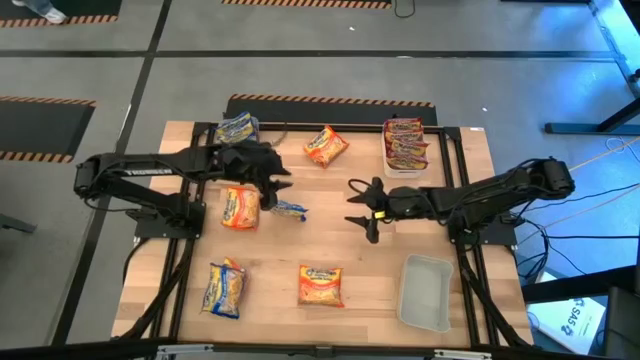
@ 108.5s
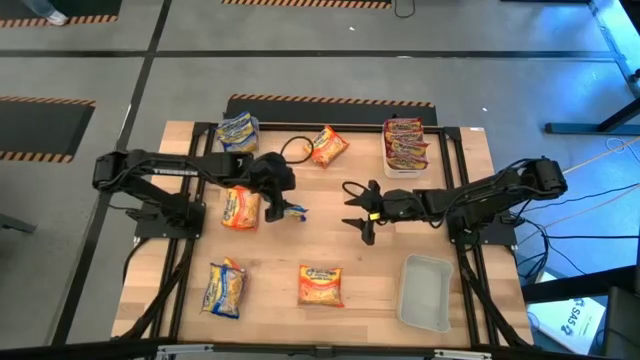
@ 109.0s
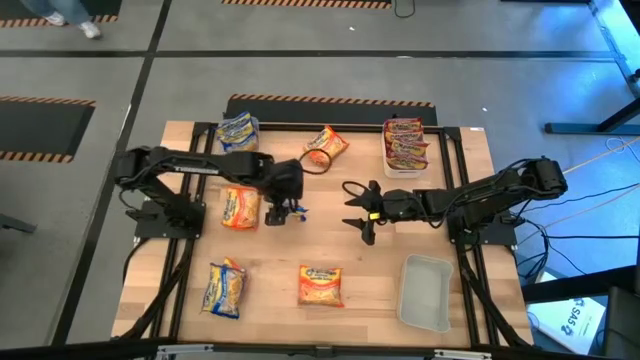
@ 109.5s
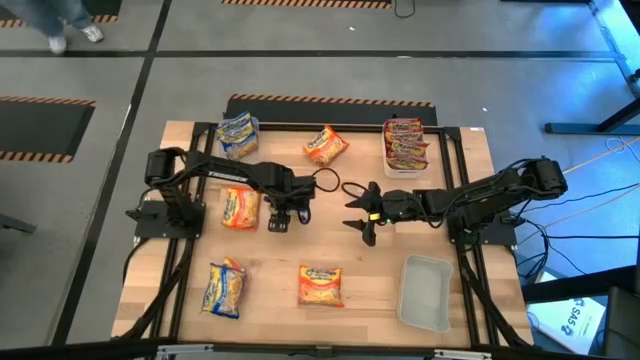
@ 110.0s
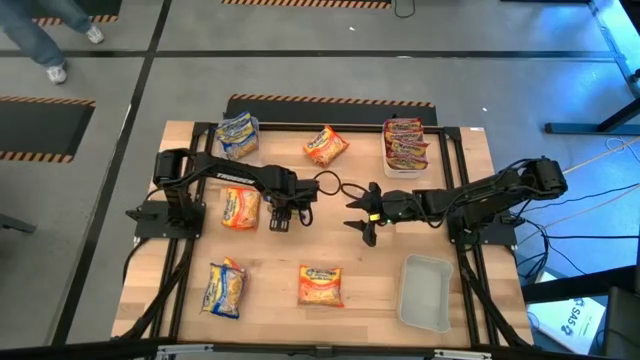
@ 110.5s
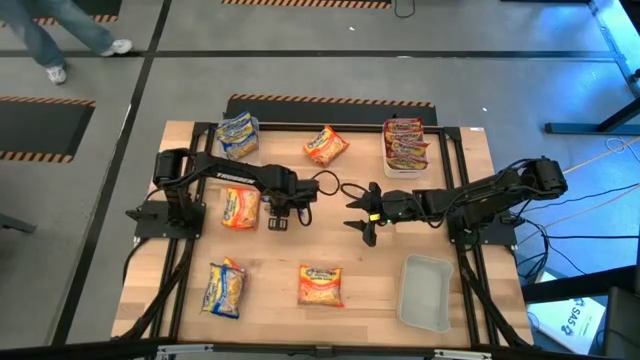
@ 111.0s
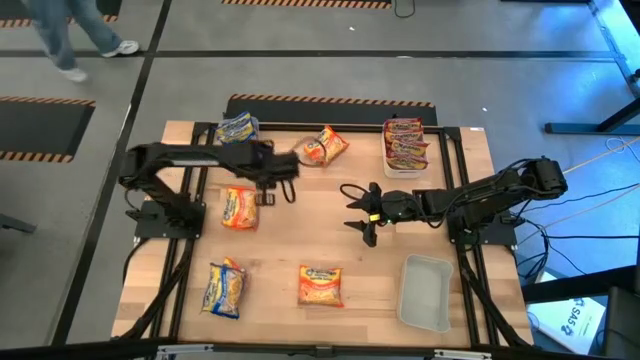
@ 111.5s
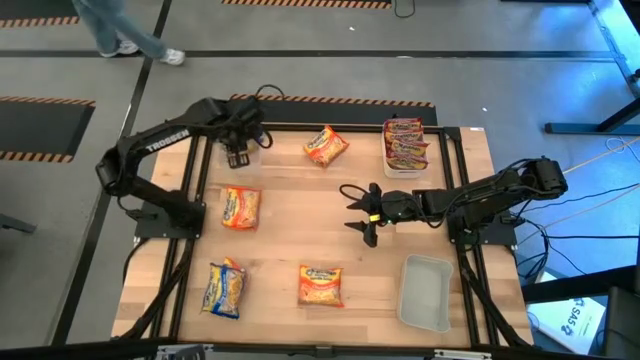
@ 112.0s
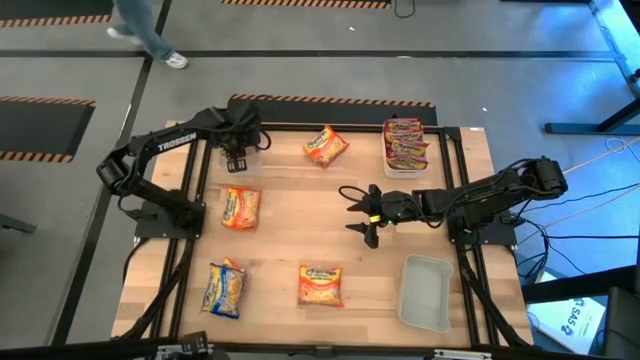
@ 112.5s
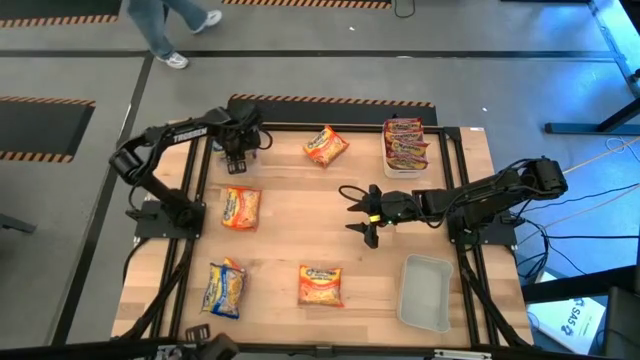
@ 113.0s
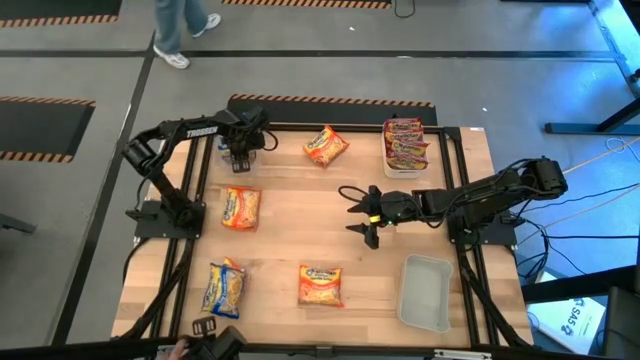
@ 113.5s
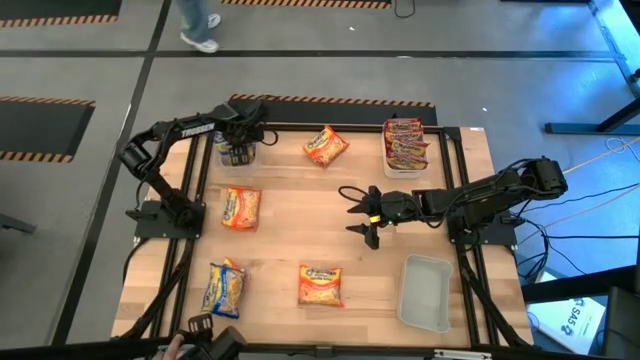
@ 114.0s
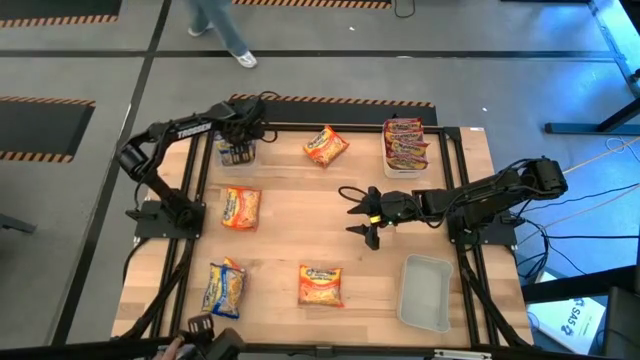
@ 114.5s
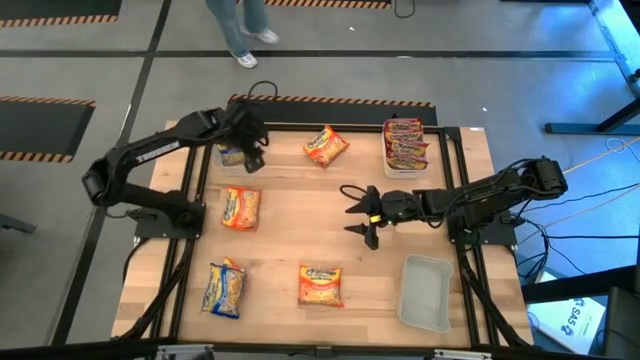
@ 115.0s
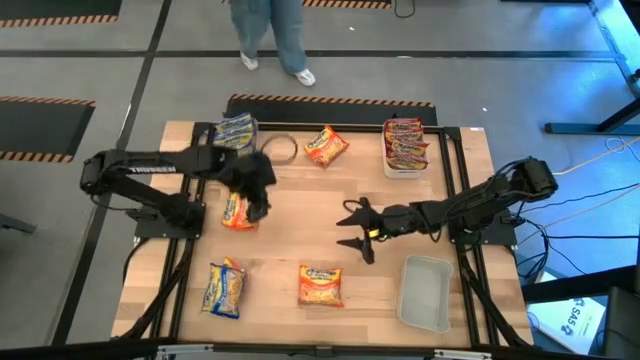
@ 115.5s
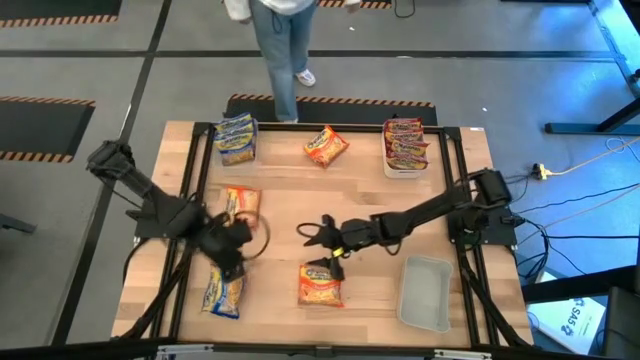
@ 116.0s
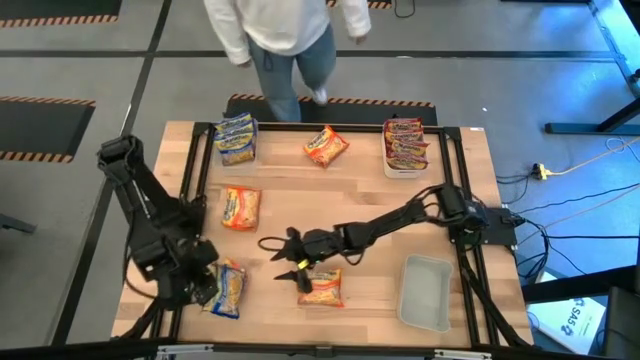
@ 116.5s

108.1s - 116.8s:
Task: Sort Maruchan noodles
Put the top blue noodle pack into the transparent bin

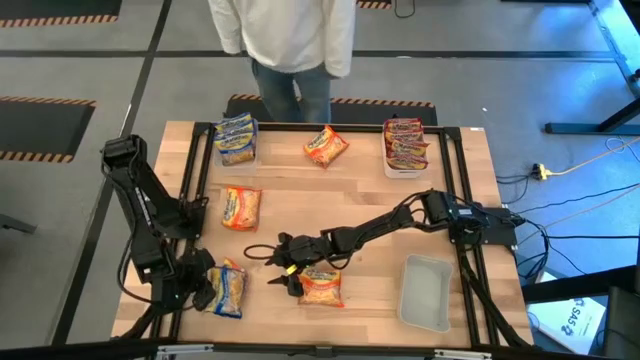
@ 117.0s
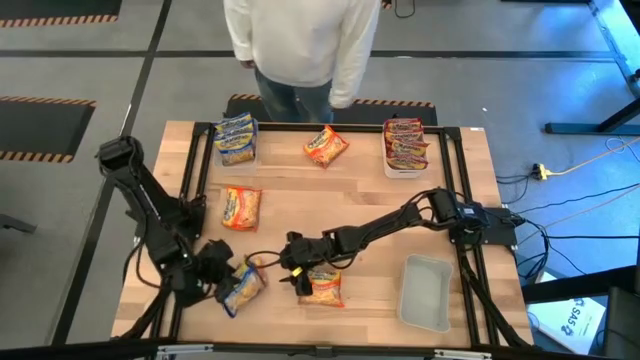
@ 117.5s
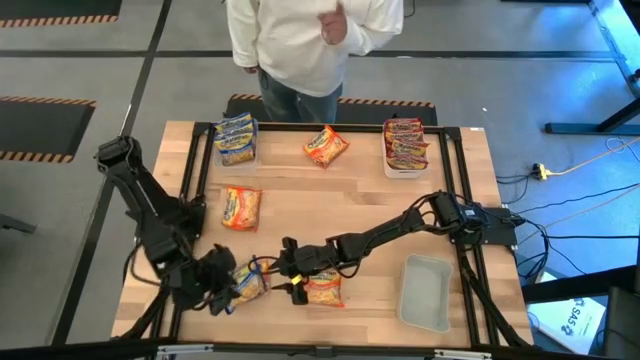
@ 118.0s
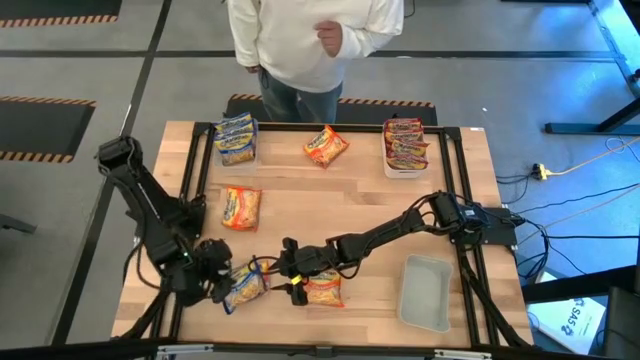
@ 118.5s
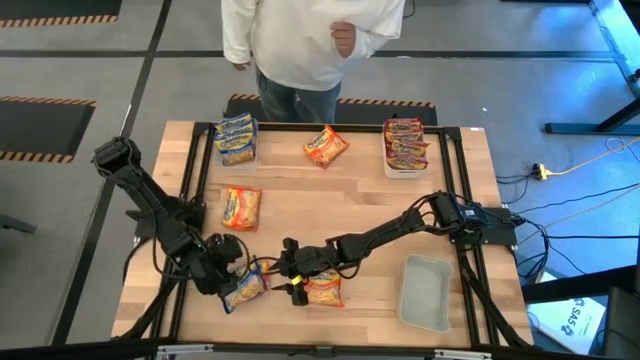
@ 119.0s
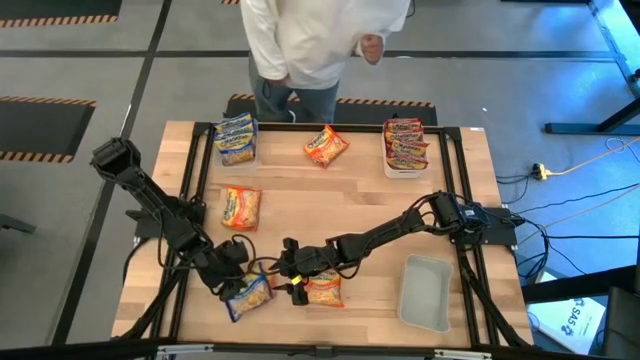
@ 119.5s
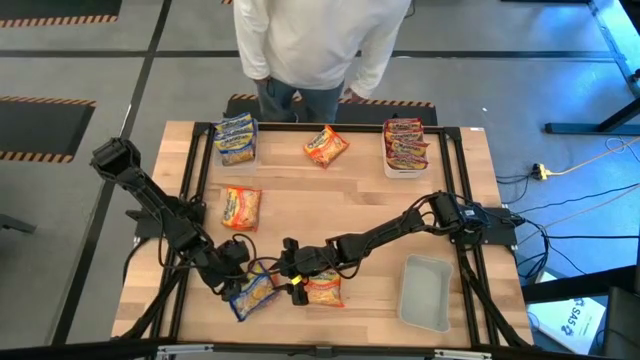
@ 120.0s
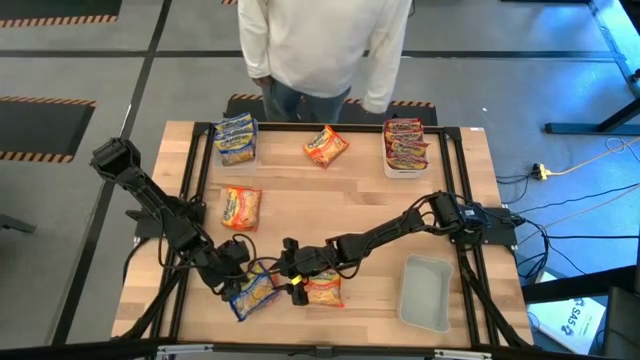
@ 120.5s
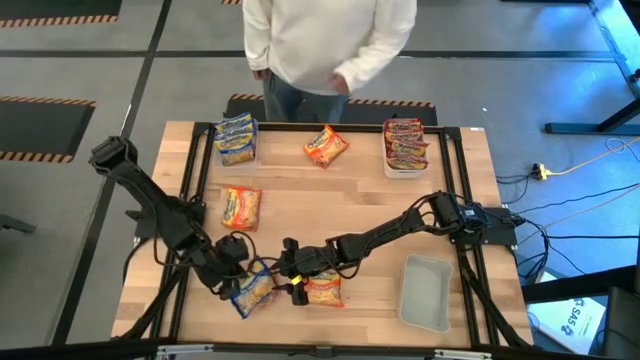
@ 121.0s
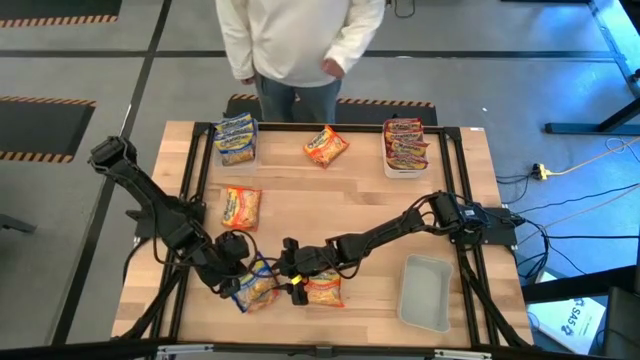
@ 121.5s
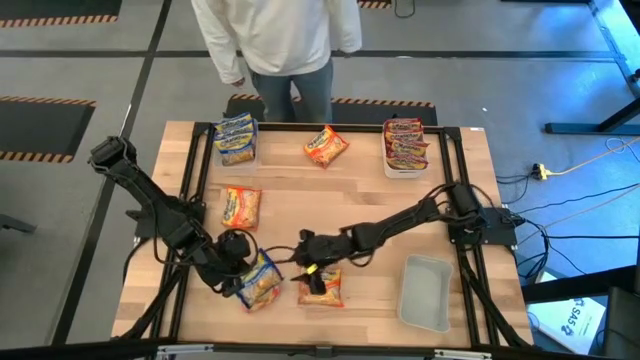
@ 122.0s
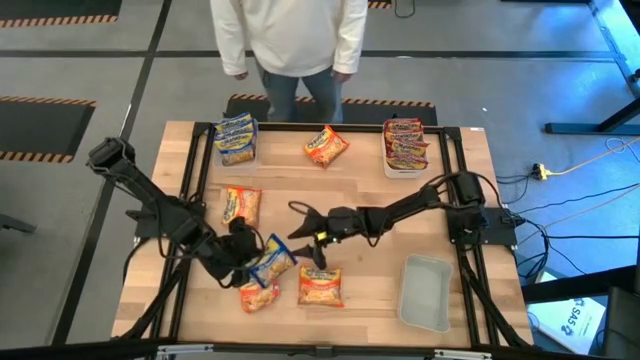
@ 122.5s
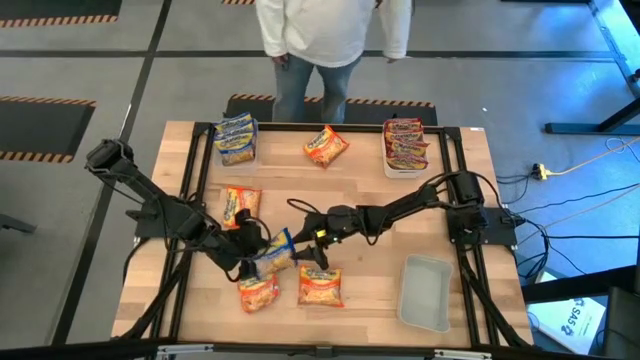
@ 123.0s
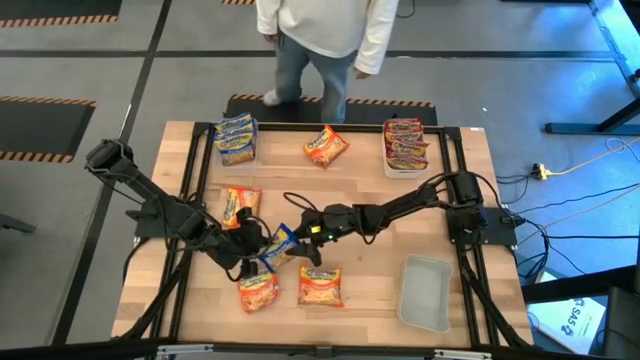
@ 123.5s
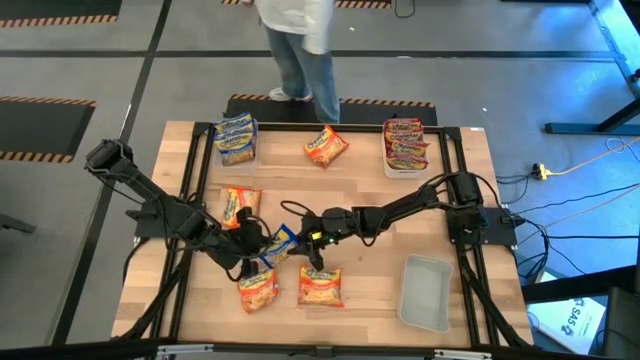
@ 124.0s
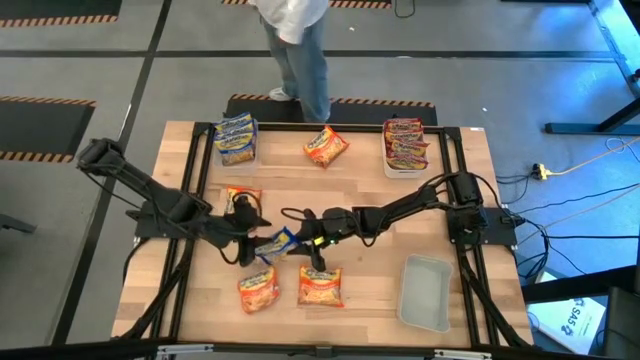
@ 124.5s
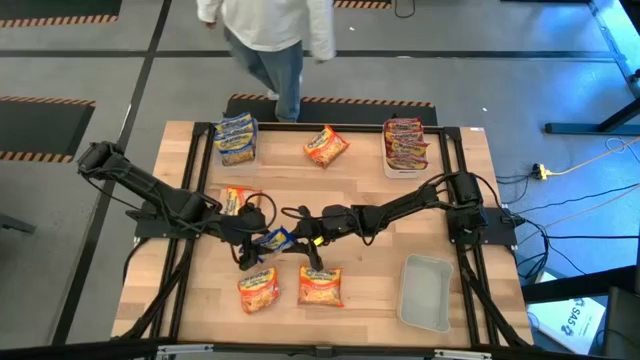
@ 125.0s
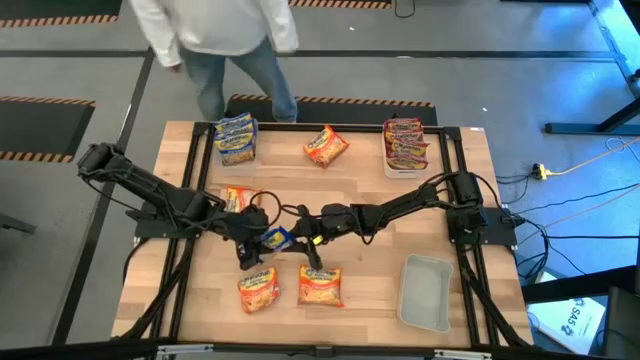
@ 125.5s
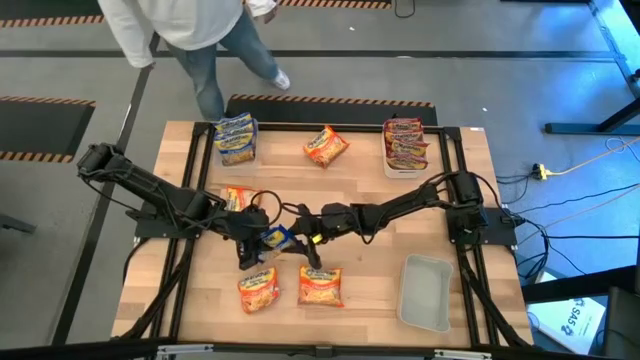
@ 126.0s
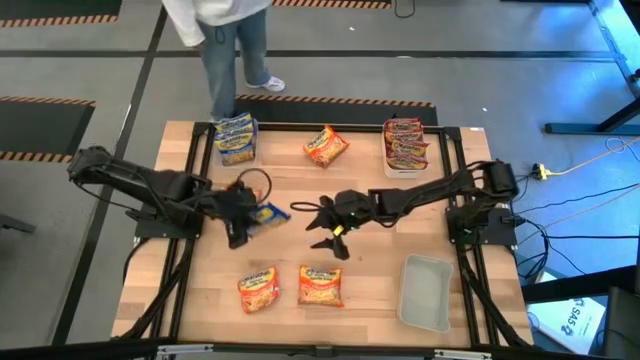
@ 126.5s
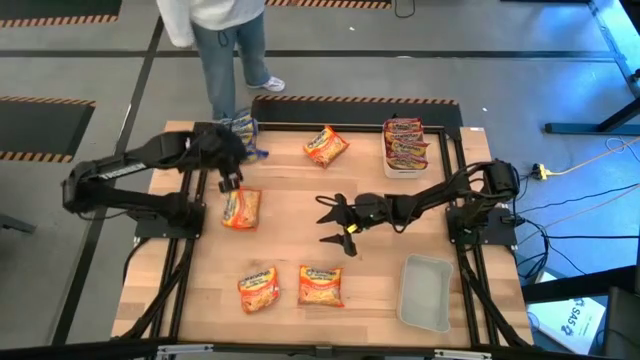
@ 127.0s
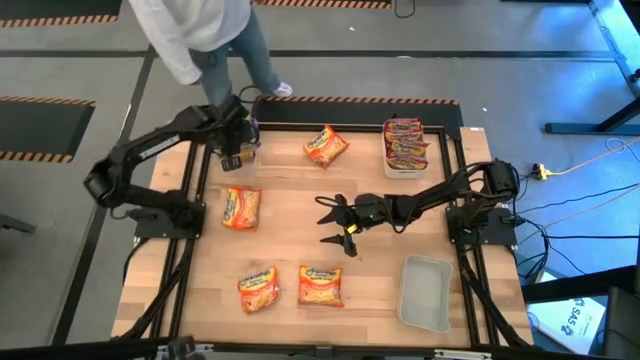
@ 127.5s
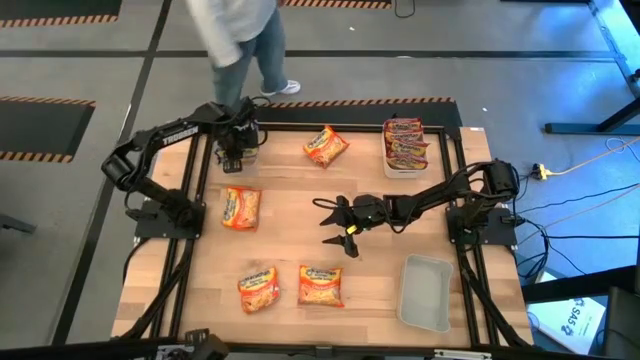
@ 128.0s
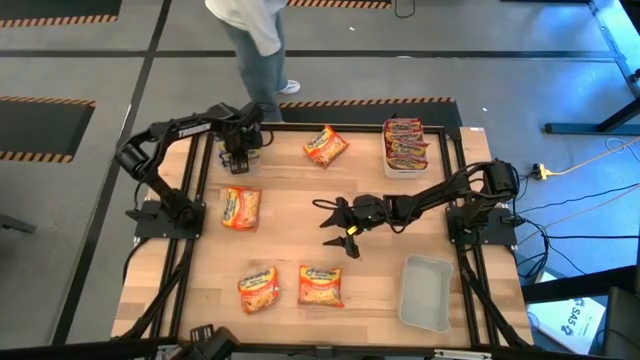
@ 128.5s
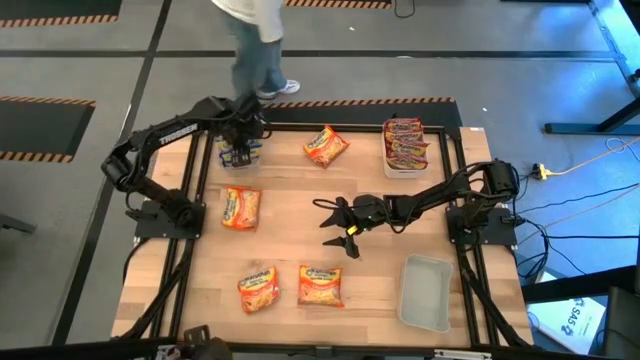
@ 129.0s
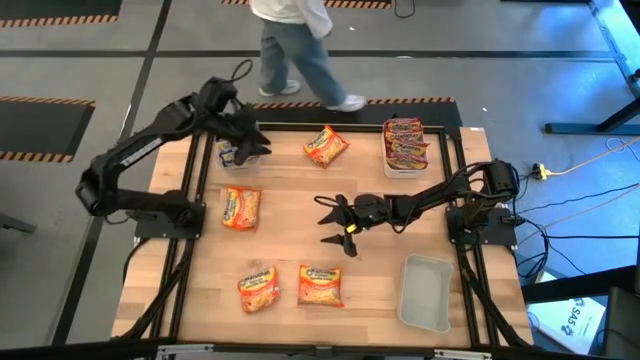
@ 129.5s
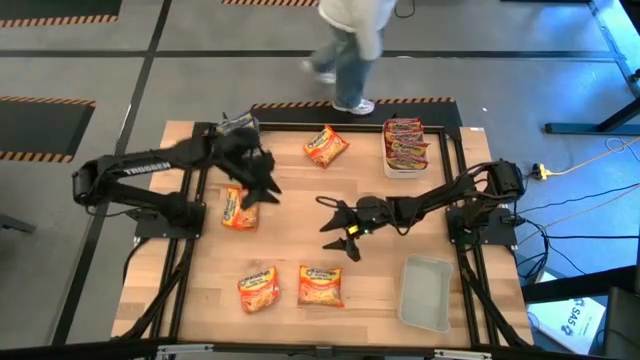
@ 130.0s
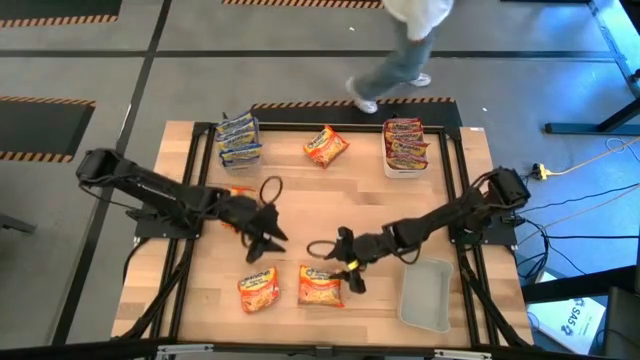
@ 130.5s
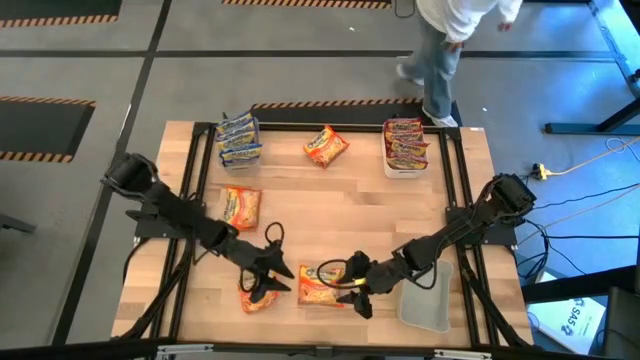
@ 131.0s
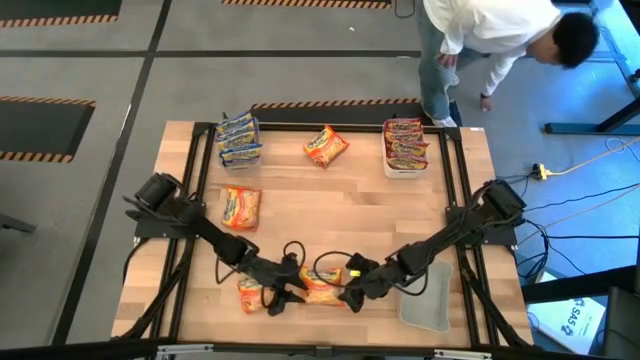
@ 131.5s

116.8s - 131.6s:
Put the blue noodle pack into the transparent bin
